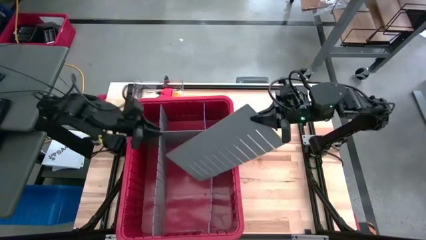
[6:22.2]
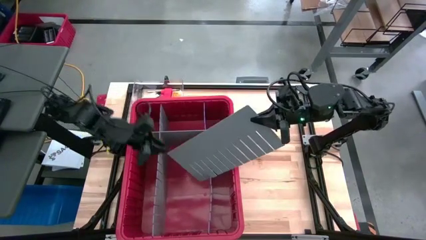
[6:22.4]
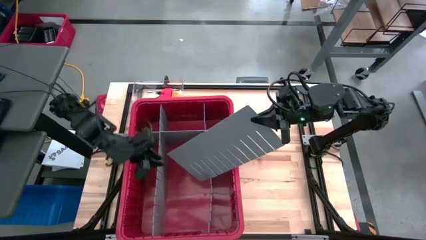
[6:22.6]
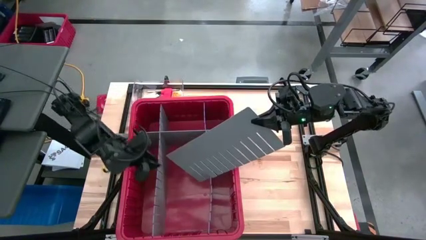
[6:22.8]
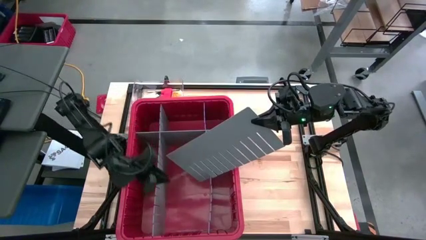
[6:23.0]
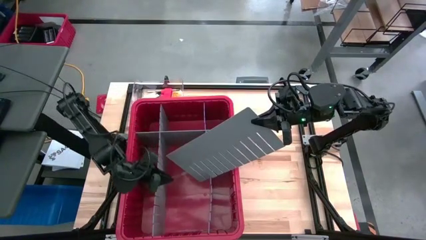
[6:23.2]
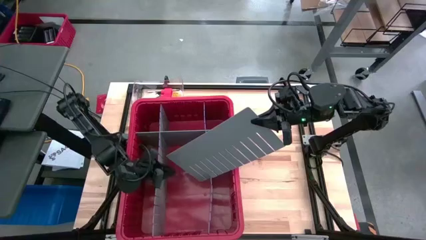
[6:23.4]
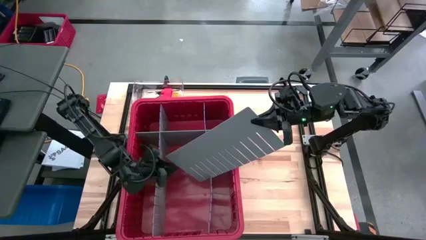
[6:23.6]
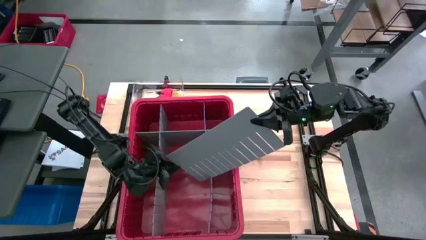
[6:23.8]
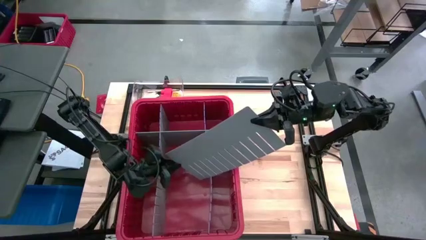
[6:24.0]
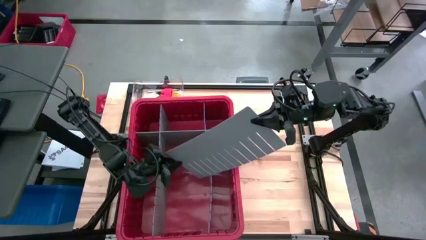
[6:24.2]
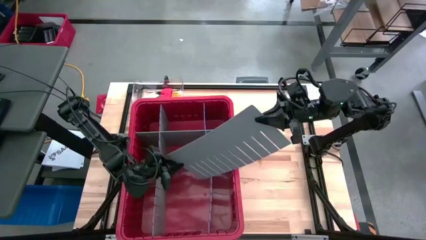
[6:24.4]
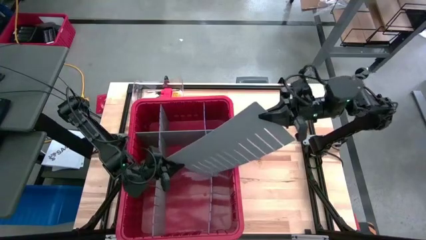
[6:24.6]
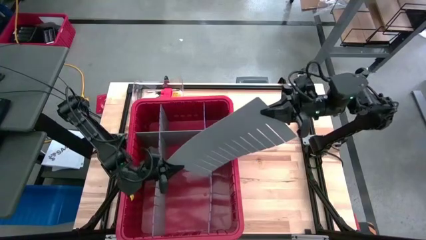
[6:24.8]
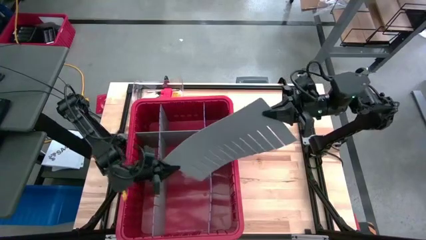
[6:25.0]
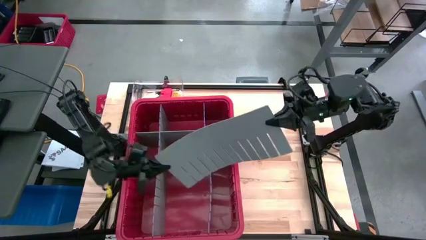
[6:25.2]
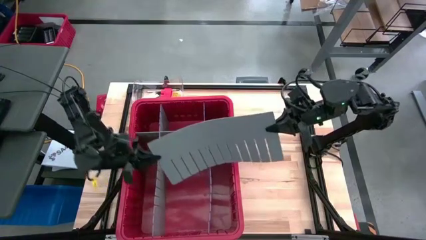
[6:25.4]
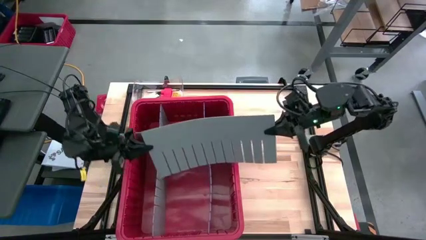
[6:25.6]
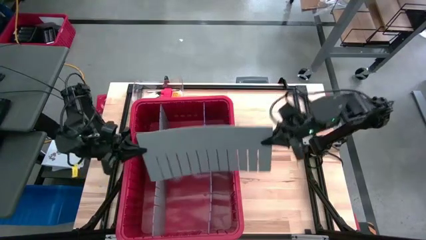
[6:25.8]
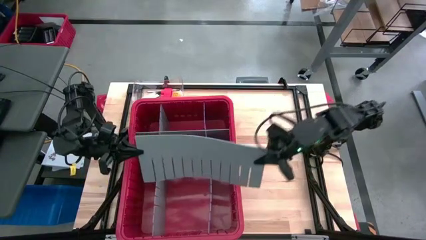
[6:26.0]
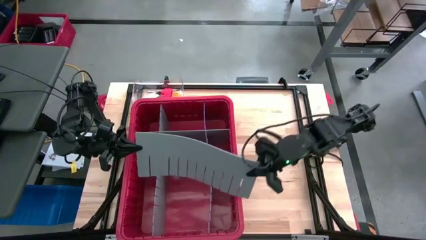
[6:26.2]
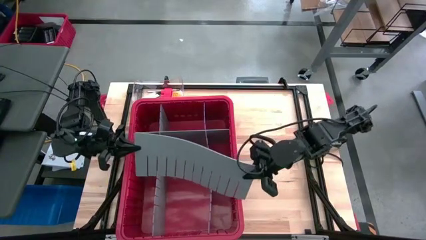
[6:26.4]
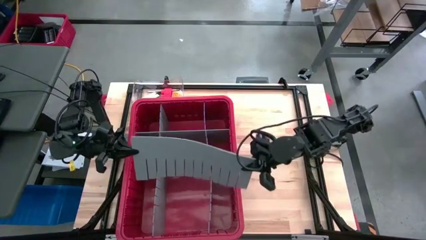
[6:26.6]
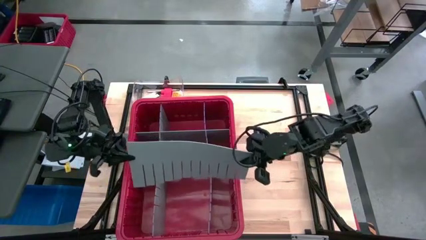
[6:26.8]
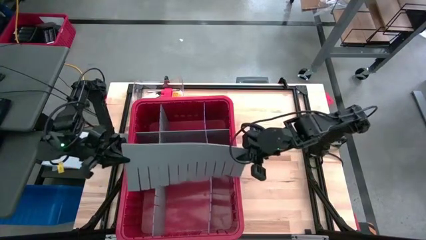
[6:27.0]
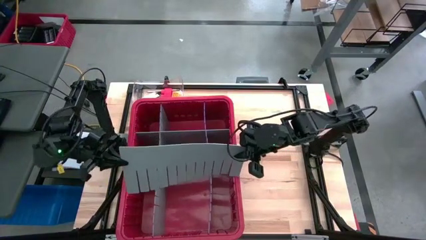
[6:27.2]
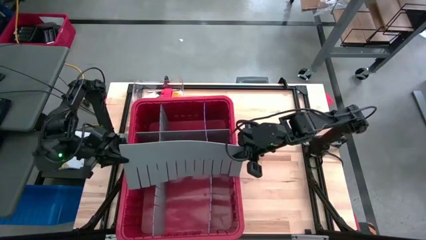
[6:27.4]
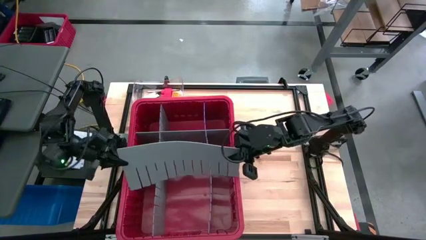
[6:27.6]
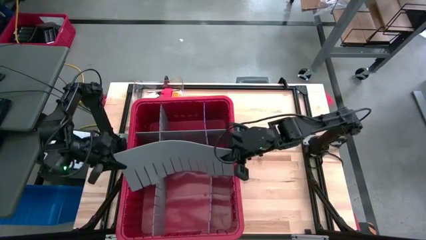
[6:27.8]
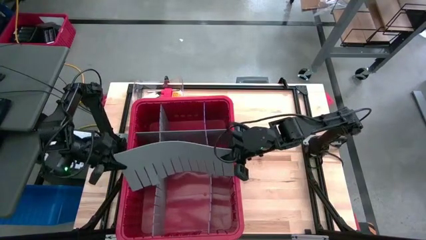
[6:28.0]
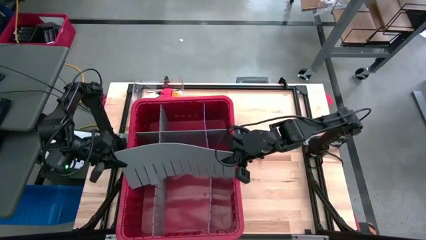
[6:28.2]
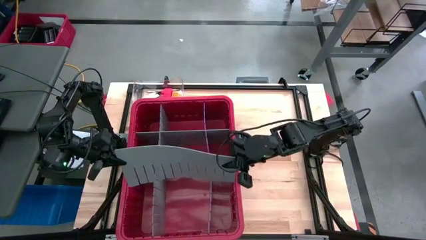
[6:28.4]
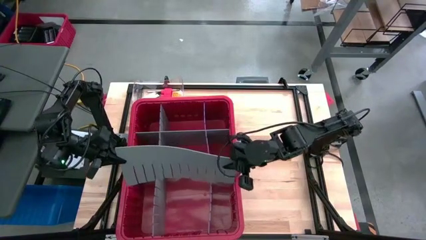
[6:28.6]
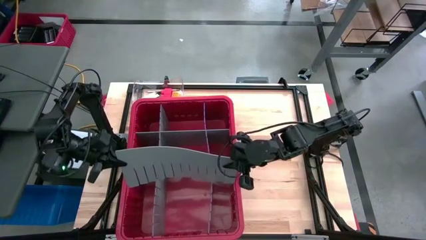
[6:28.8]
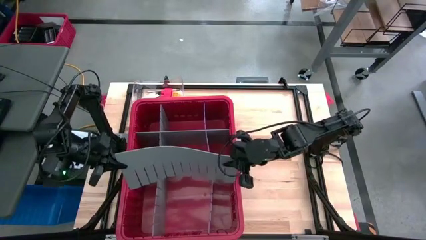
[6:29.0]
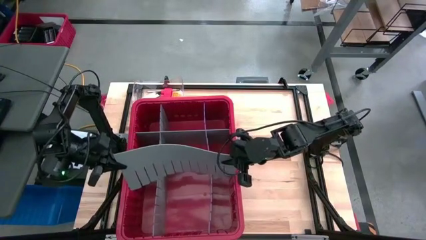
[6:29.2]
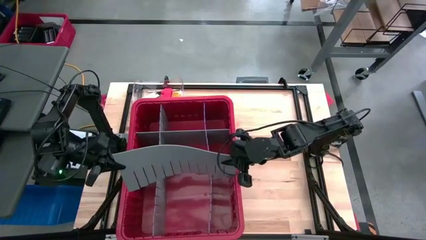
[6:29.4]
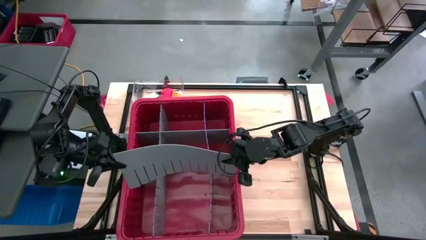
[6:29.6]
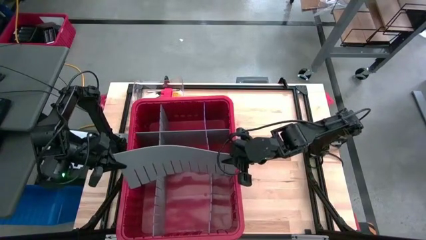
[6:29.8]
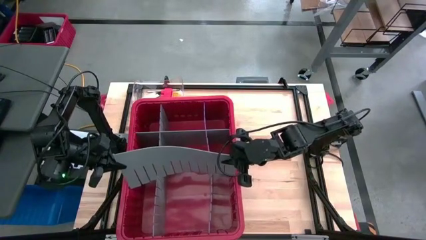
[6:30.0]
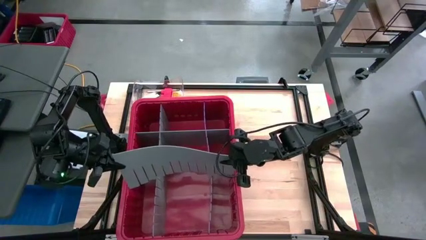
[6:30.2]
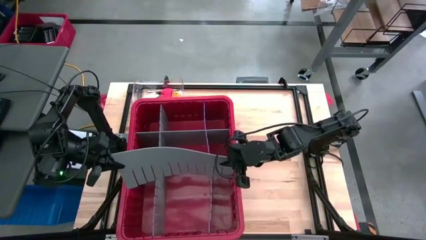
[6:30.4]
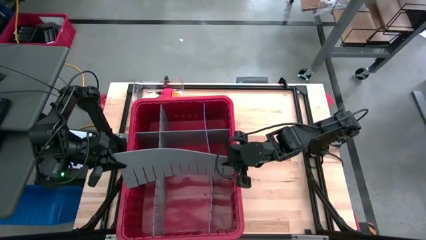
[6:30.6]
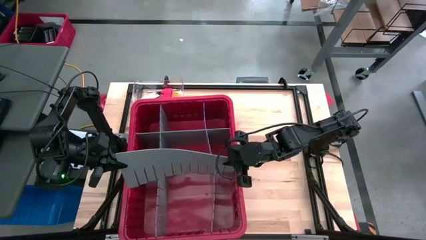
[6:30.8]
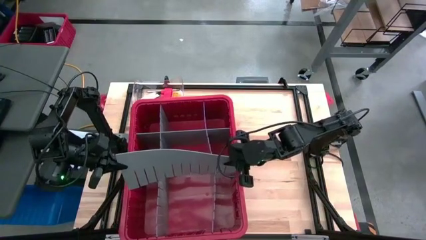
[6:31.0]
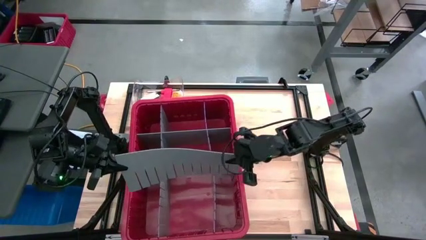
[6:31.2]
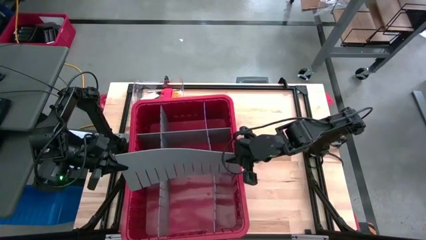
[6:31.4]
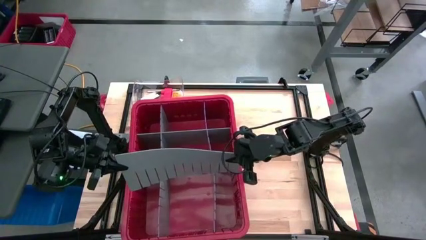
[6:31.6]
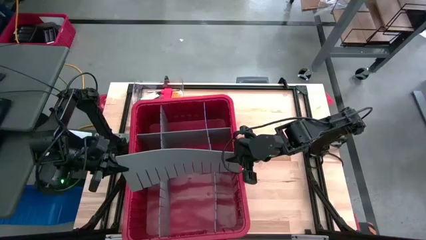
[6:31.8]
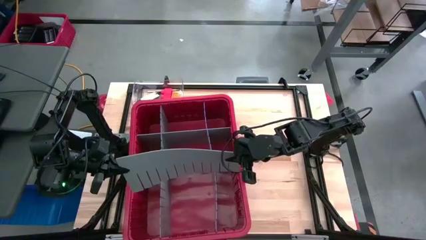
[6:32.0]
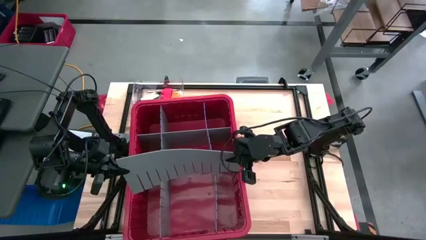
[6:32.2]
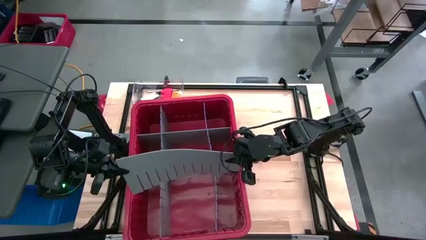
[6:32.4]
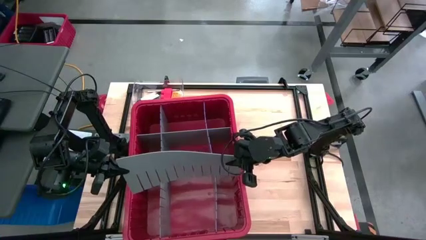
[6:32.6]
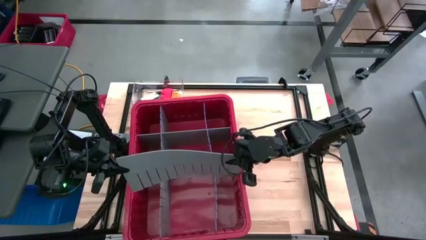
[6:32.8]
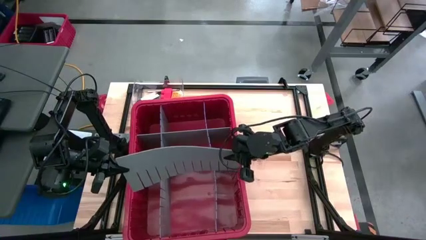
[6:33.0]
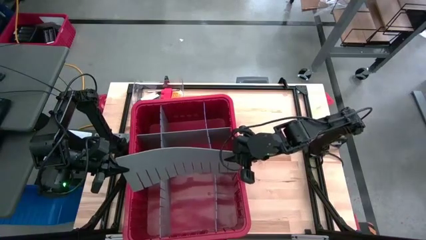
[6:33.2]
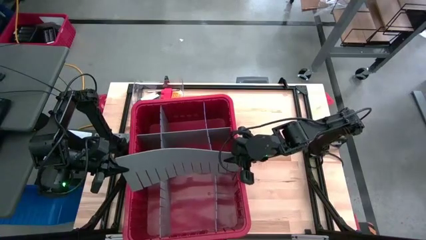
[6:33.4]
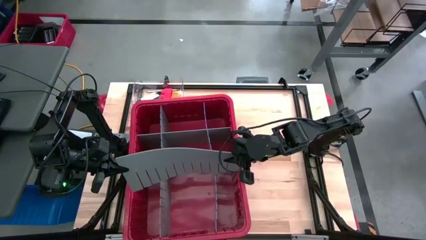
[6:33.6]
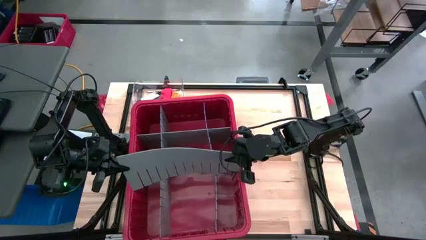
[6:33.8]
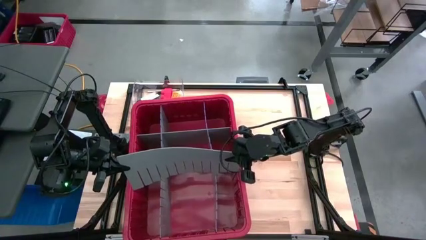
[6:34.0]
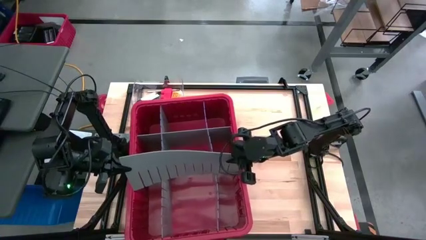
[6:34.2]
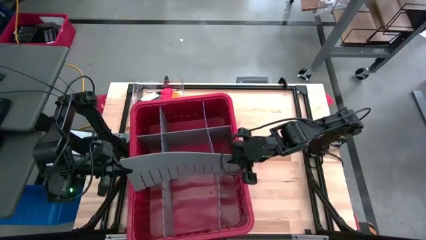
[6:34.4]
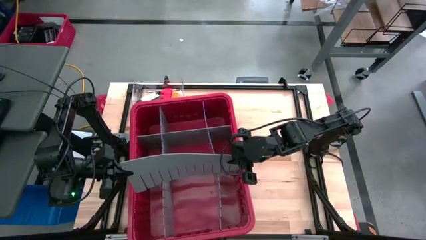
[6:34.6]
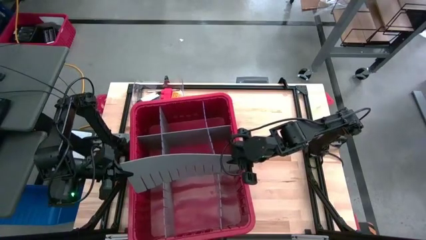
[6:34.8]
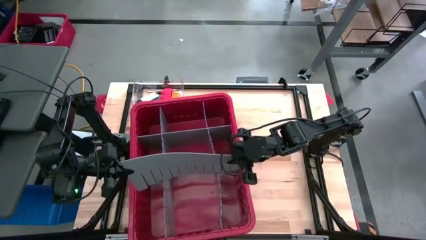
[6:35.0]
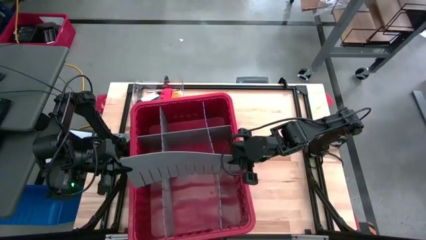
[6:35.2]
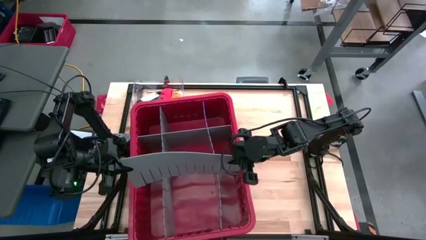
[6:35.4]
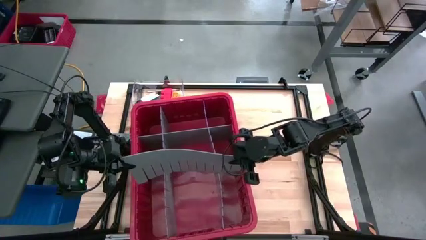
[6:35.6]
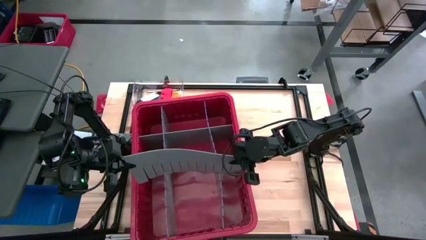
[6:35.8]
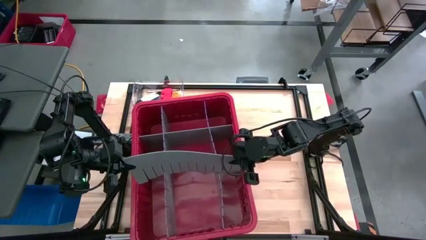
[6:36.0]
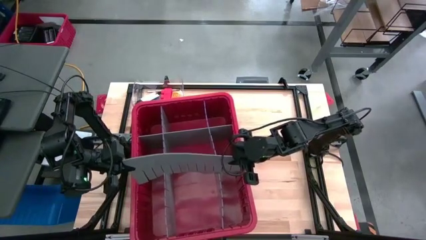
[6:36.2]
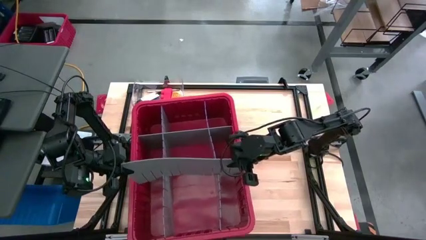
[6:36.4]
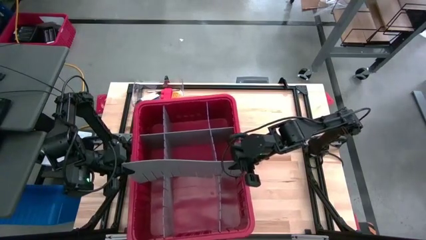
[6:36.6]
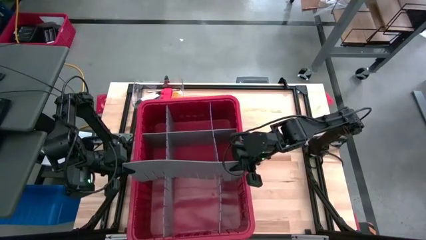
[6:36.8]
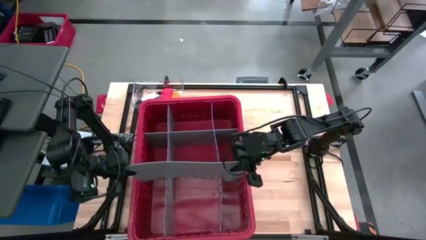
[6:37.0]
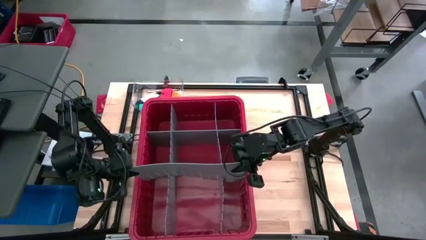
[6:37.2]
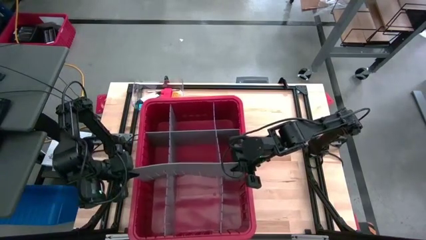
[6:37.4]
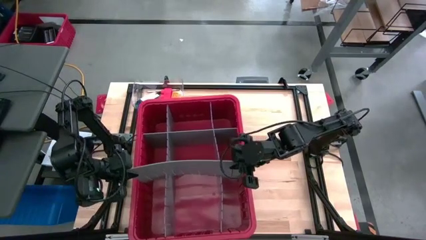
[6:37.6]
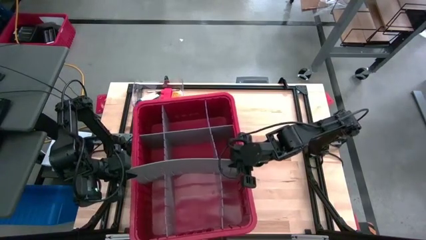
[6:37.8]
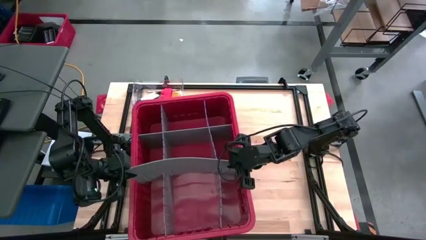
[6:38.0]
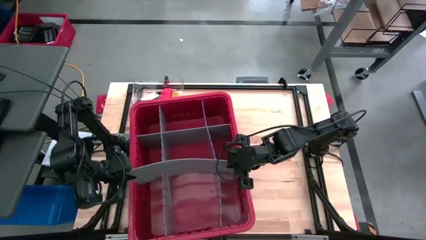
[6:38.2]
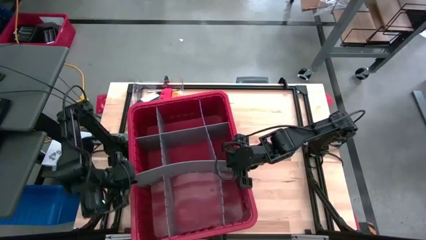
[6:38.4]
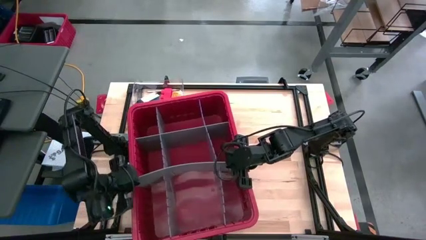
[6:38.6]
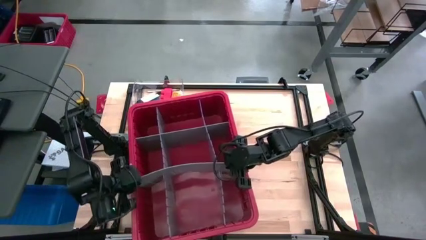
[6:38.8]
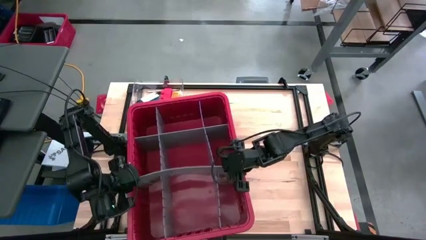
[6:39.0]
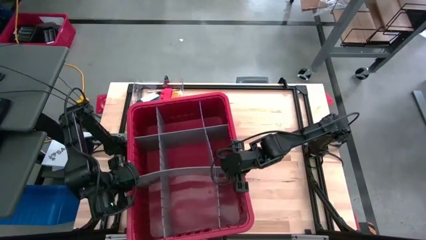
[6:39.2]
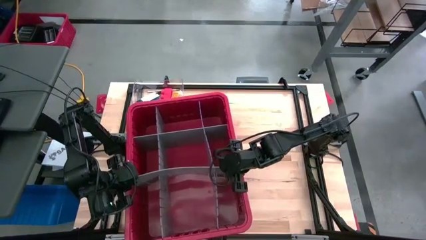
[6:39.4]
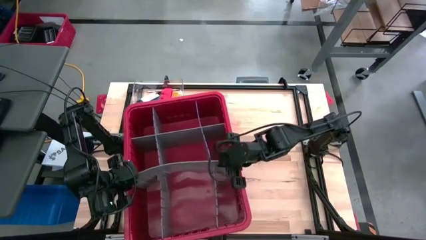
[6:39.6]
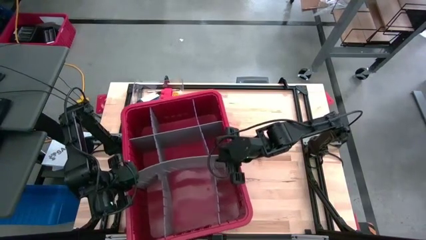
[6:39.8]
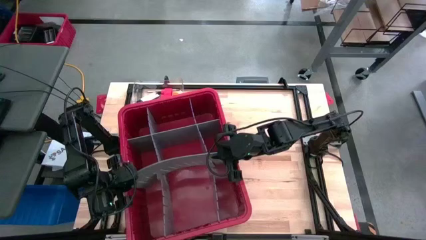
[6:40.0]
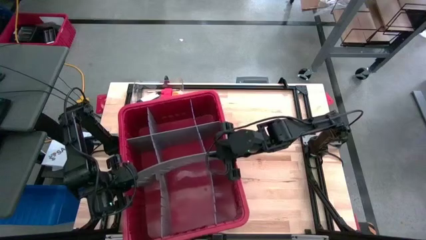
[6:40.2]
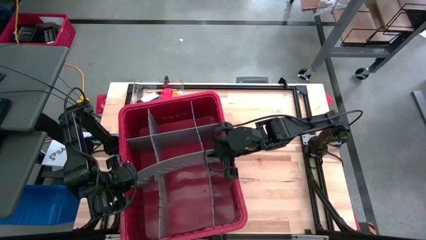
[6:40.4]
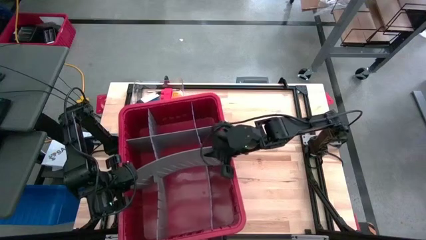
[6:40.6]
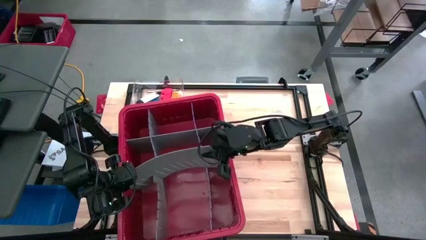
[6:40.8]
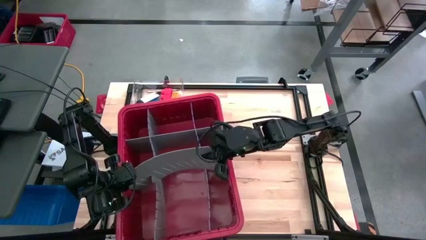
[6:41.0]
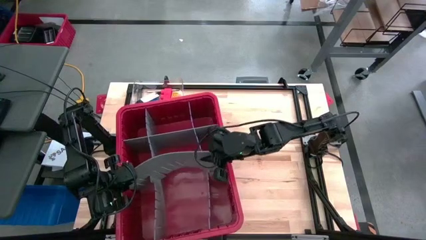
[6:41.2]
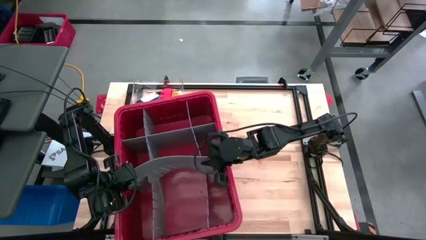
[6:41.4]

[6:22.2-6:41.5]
Task: Sort blocks
Assemble the bin divider into the red bin
